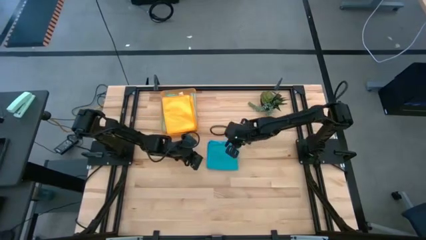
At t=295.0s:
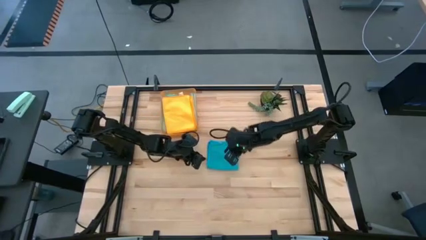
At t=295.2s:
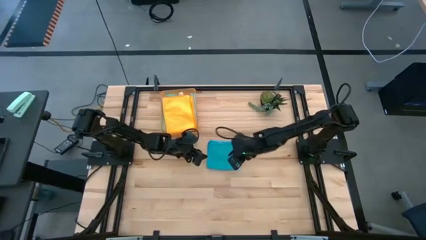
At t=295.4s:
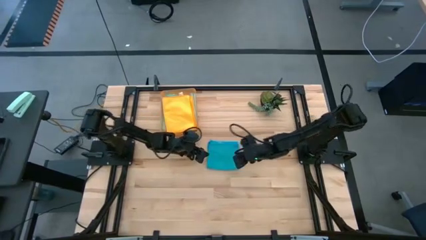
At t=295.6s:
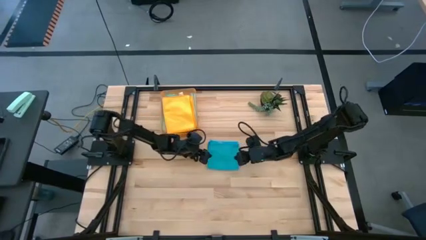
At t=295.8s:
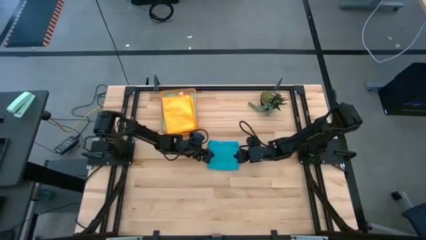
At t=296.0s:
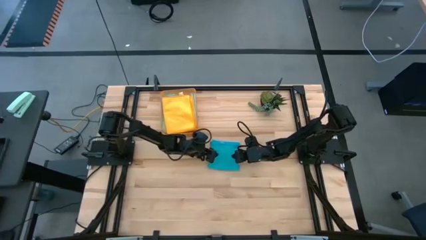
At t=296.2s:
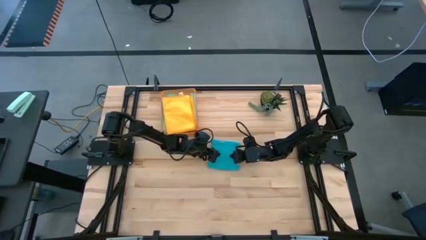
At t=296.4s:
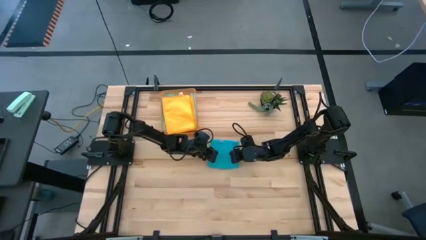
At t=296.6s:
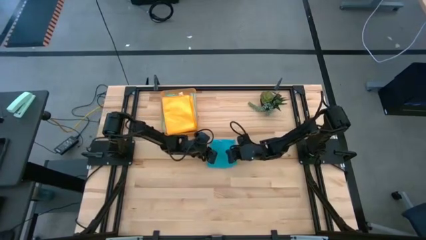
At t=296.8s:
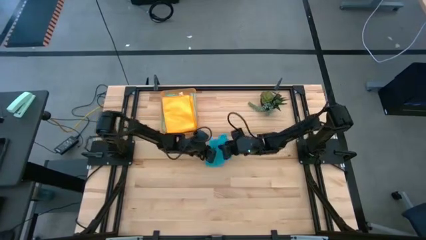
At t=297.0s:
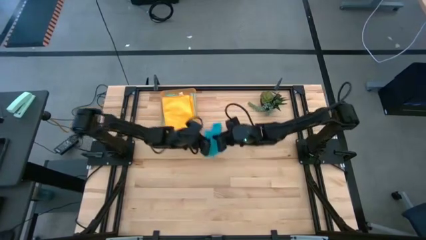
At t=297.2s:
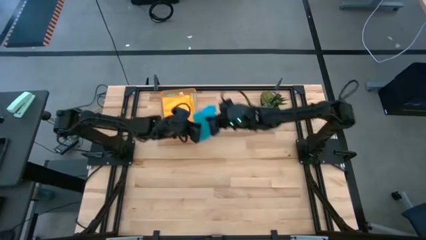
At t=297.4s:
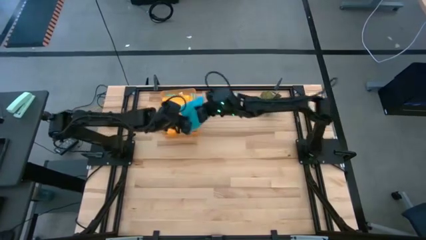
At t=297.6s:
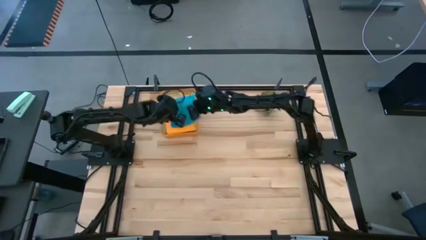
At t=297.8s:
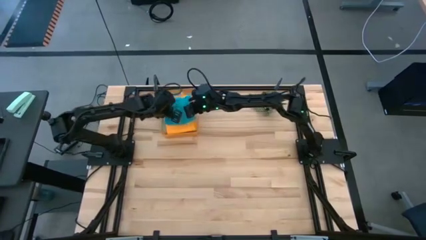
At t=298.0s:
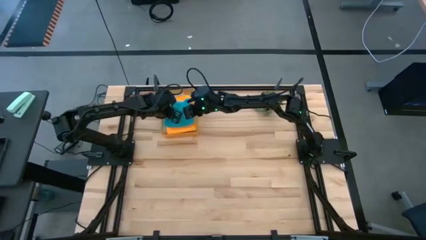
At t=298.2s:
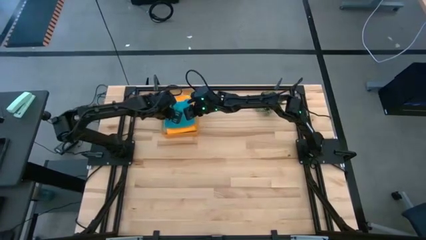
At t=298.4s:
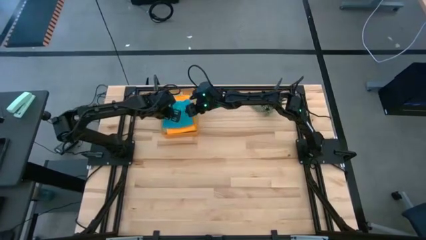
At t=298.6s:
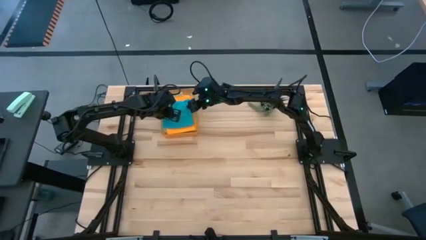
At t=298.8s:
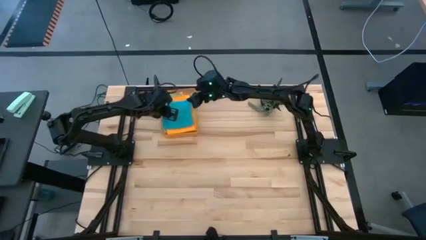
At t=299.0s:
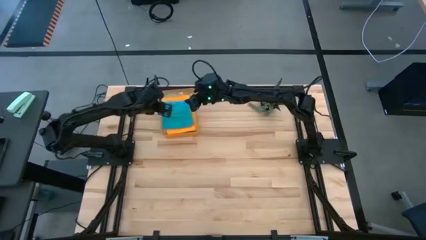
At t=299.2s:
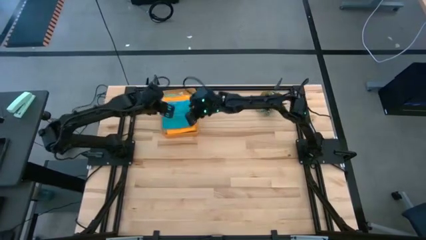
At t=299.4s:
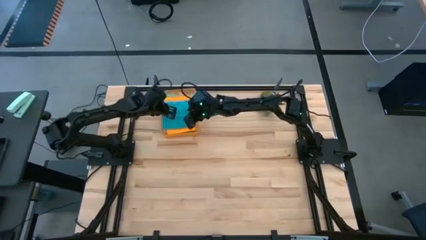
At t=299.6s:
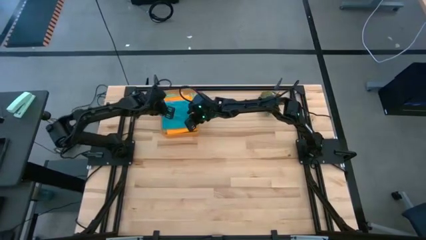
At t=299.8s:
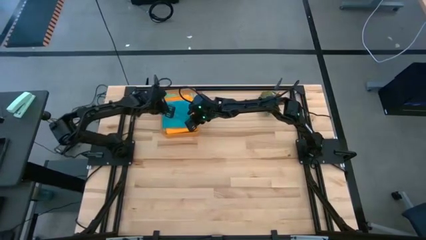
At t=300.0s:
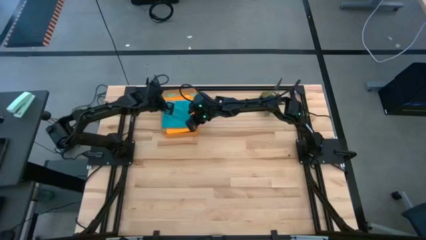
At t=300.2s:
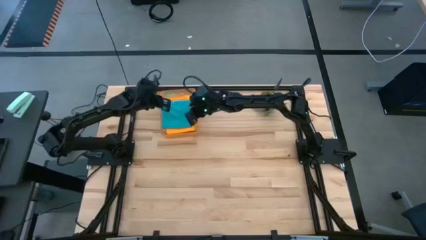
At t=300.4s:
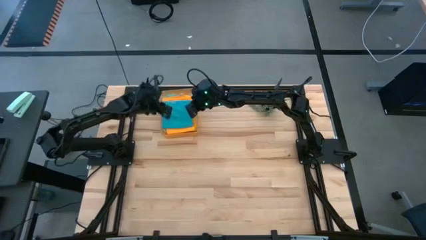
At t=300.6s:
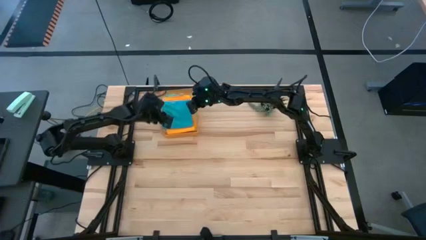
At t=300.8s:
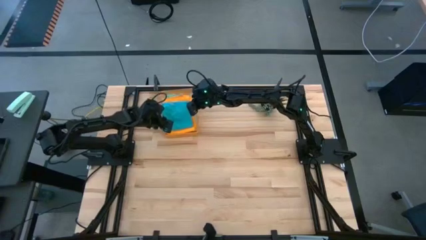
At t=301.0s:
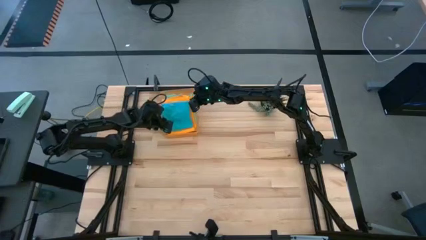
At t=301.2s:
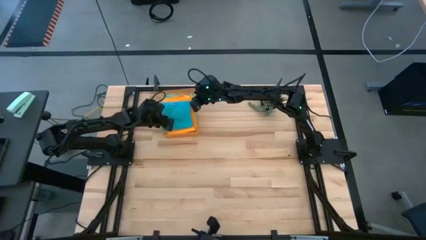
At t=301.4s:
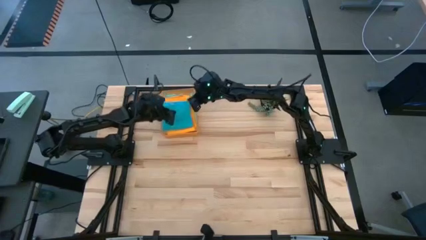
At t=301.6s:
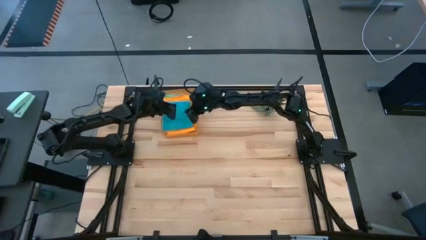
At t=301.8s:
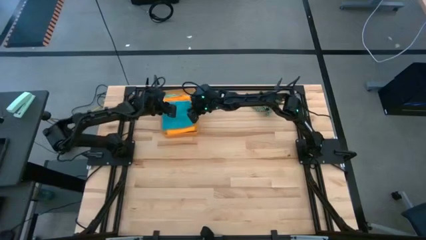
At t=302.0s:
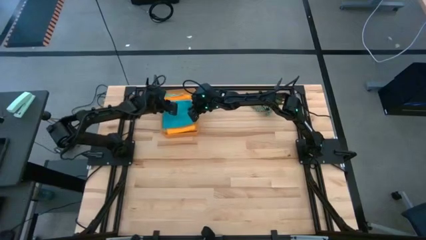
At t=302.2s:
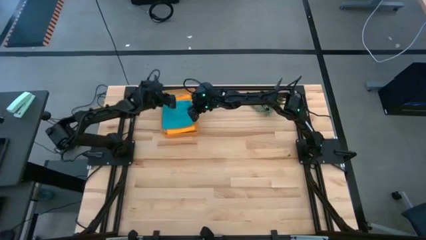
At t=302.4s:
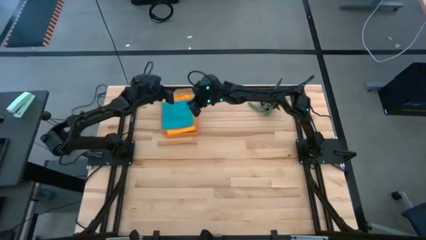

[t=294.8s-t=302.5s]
Task: Fold microfiber towels
Put the blue microfiber cloth into the orange bin

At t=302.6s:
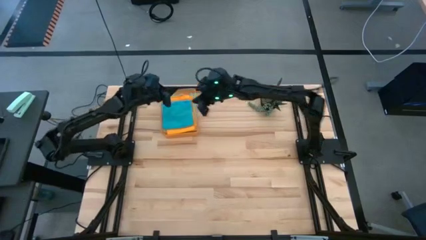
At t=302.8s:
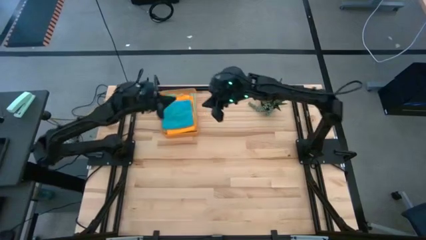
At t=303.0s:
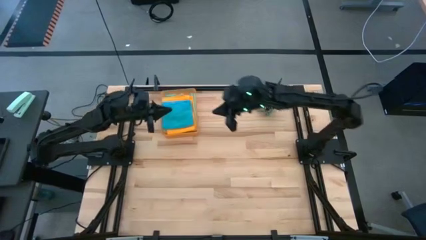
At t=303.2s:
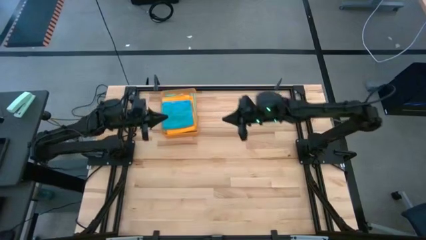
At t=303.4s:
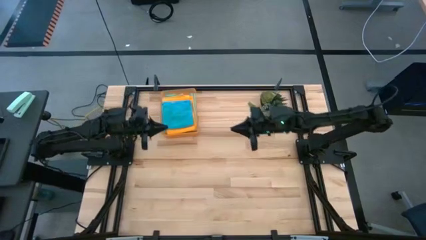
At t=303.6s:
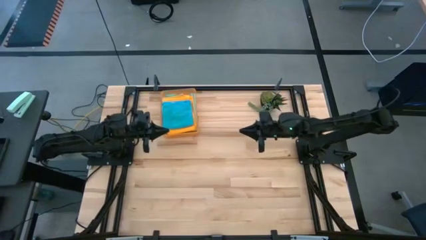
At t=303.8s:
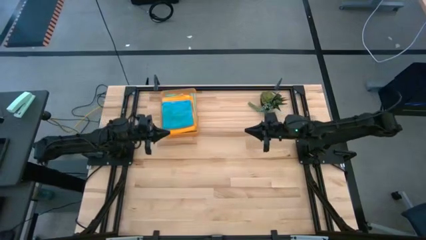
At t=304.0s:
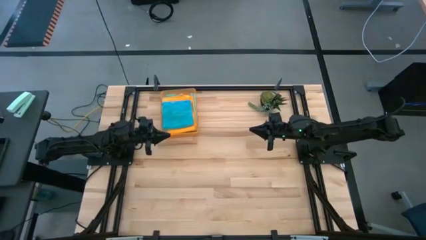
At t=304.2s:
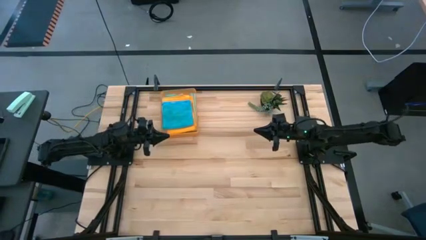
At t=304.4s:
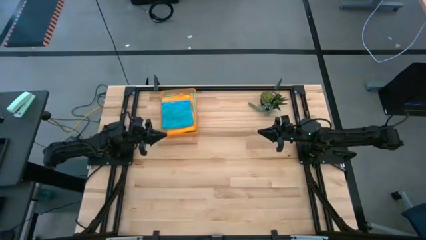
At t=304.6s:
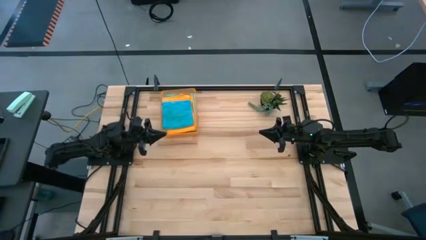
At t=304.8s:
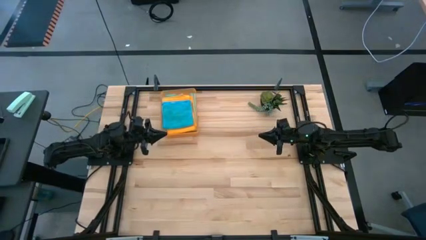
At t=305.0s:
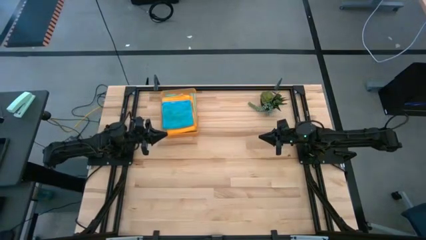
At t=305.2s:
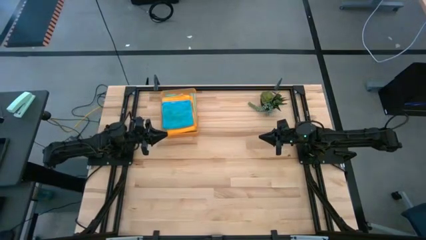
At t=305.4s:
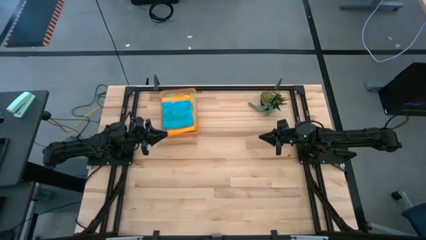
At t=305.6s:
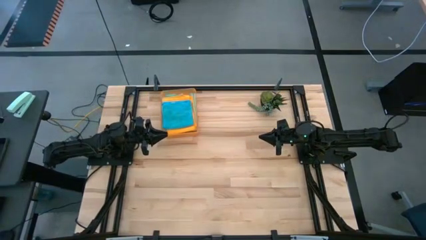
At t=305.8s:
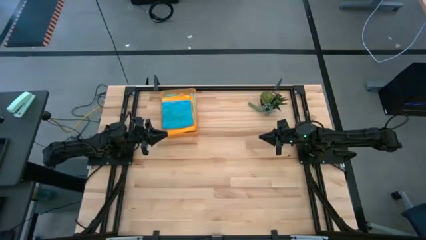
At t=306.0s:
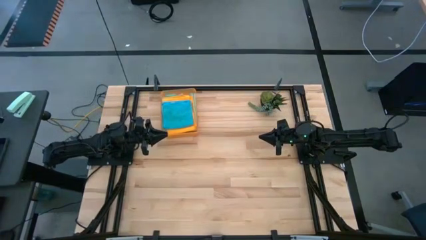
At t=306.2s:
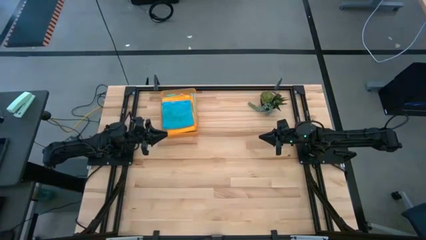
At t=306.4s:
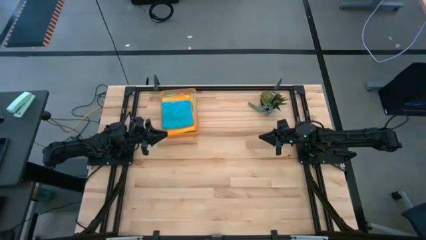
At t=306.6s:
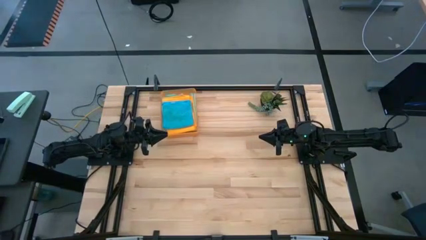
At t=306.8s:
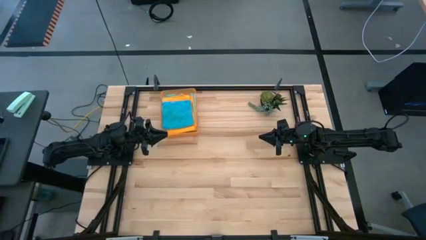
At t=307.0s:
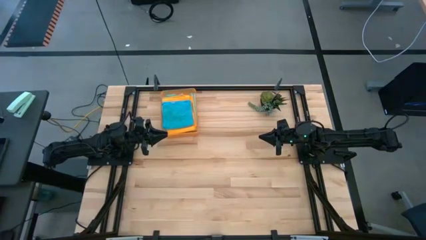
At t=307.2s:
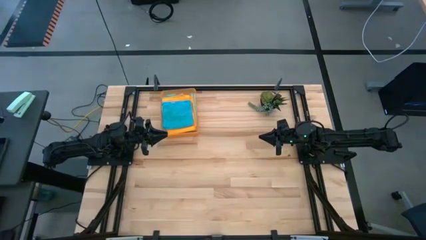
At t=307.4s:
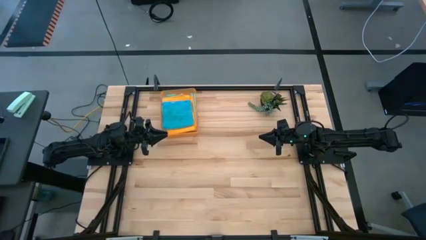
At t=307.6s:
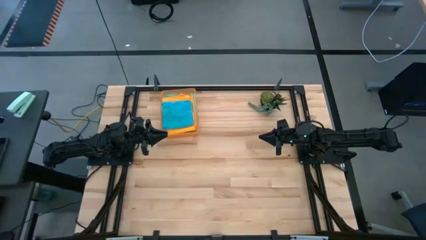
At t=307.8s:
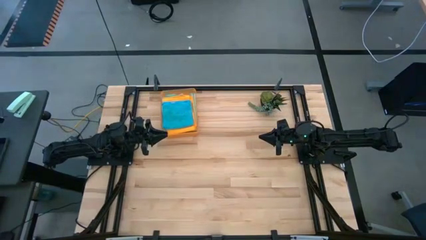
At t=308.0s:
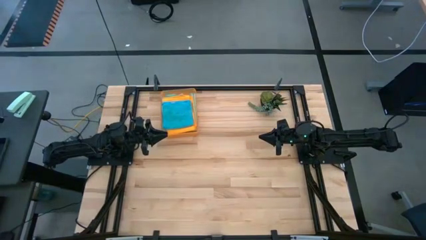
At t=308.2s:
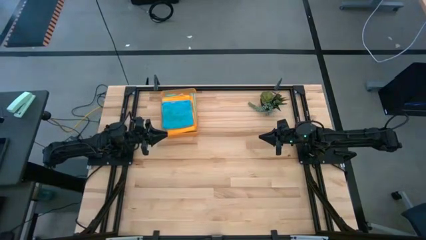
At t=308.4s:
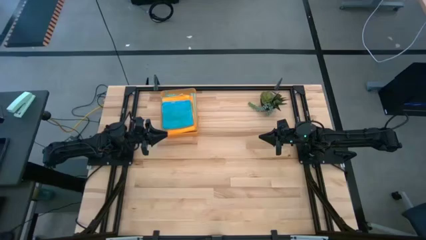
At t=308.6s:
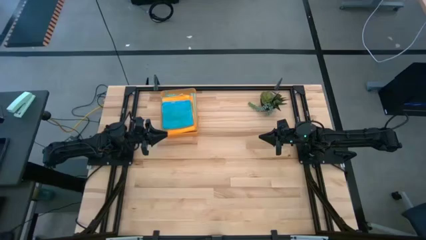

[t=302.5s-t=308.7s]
Return to Home Position
